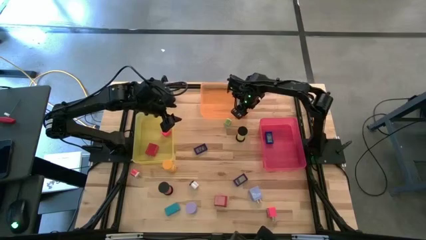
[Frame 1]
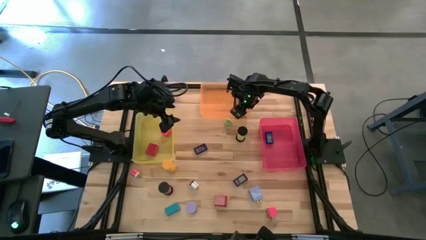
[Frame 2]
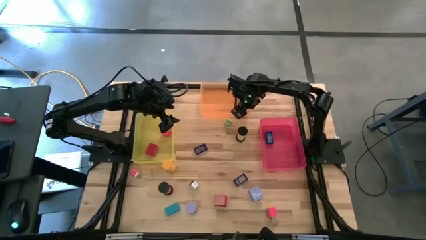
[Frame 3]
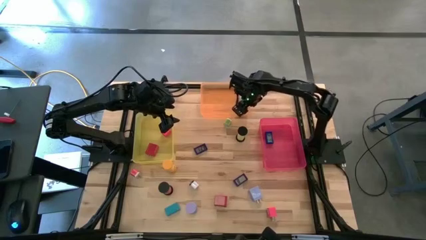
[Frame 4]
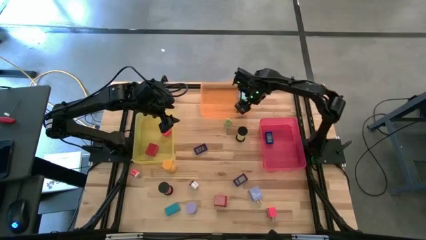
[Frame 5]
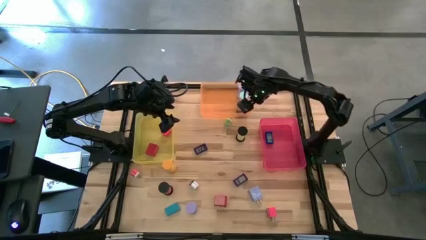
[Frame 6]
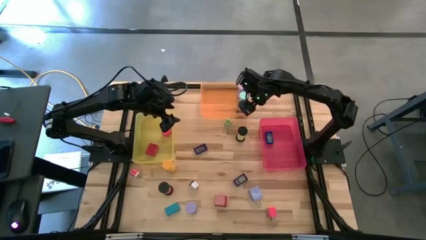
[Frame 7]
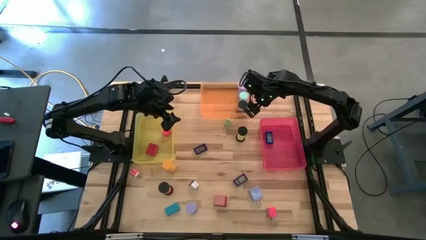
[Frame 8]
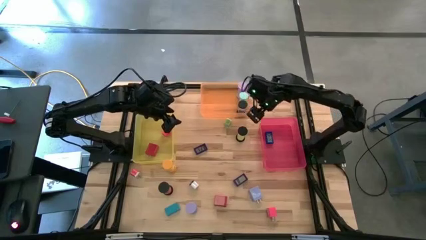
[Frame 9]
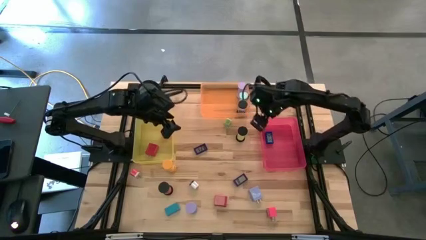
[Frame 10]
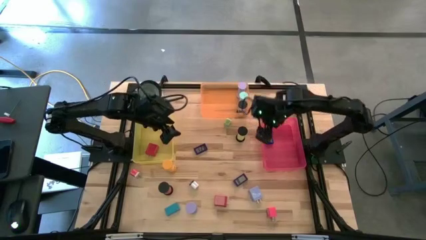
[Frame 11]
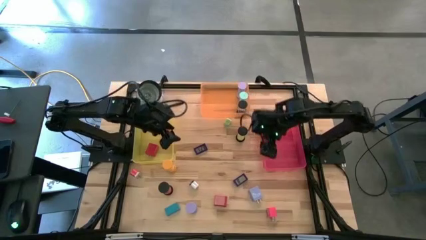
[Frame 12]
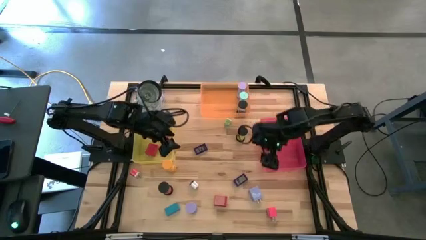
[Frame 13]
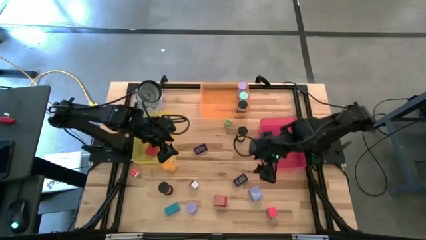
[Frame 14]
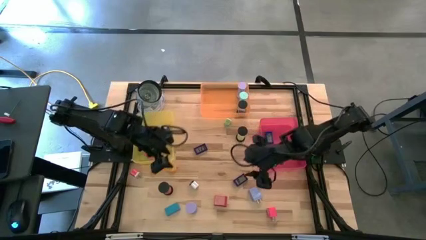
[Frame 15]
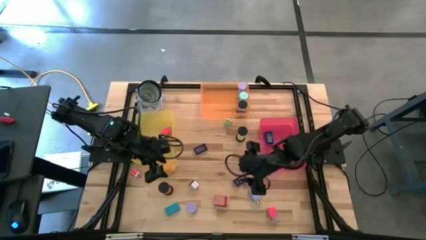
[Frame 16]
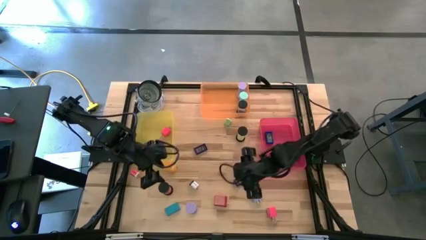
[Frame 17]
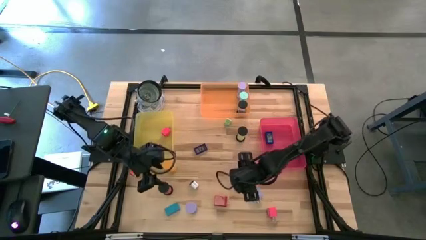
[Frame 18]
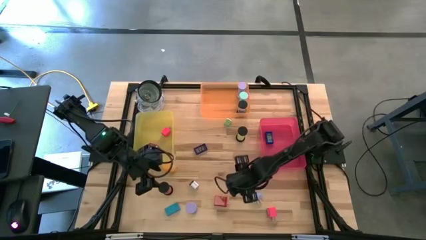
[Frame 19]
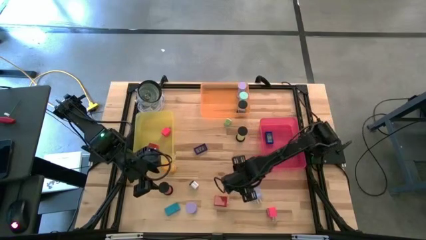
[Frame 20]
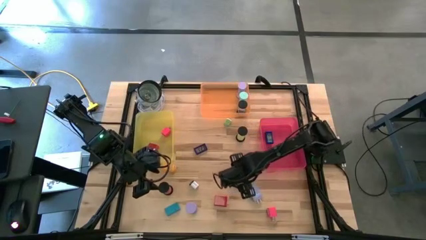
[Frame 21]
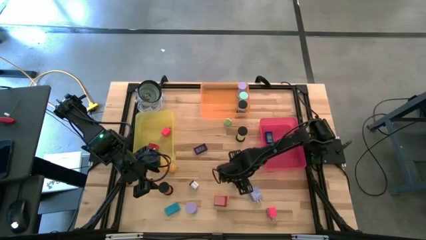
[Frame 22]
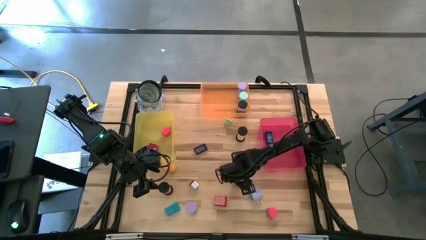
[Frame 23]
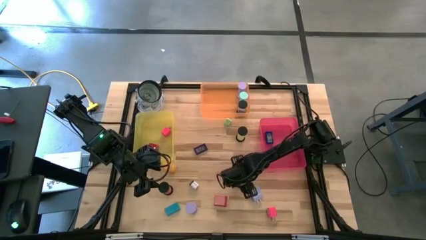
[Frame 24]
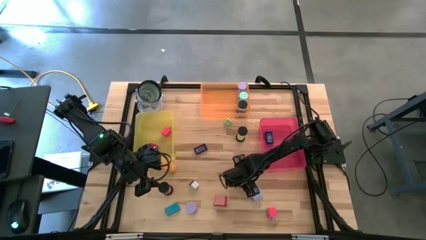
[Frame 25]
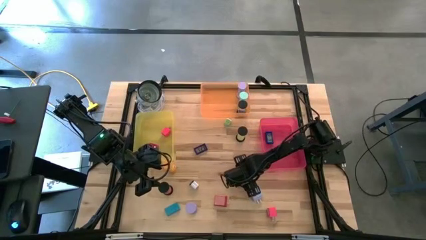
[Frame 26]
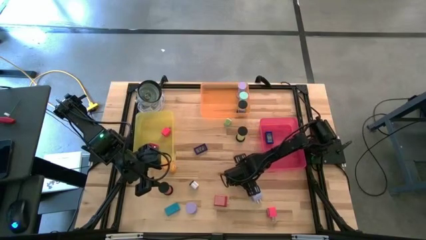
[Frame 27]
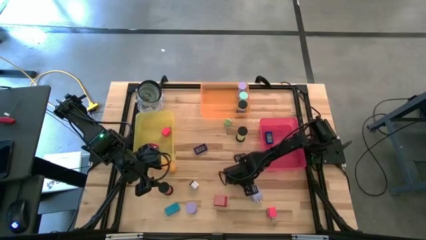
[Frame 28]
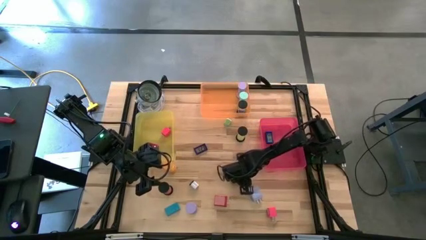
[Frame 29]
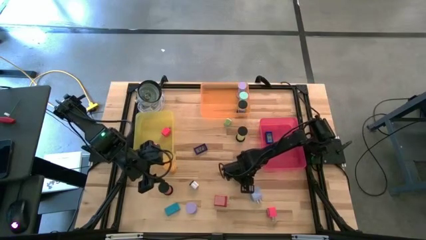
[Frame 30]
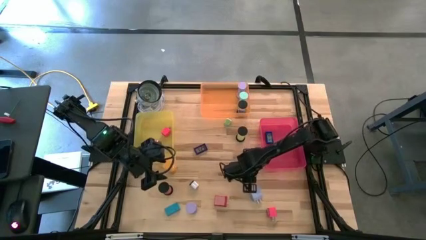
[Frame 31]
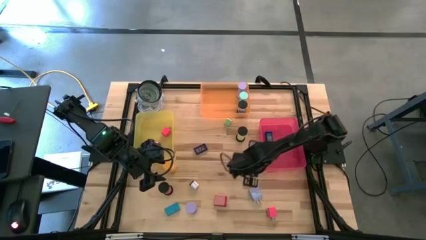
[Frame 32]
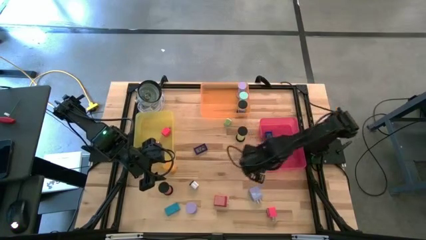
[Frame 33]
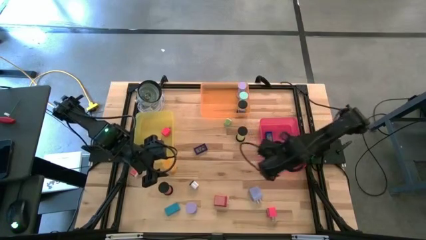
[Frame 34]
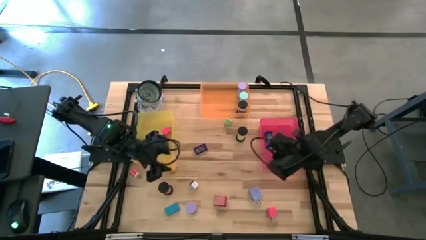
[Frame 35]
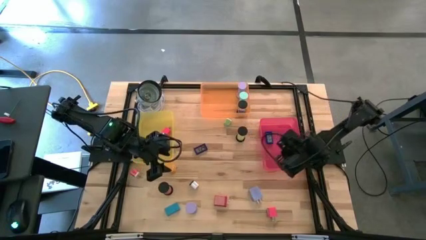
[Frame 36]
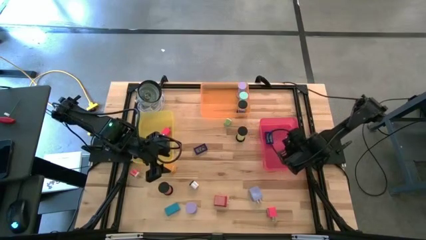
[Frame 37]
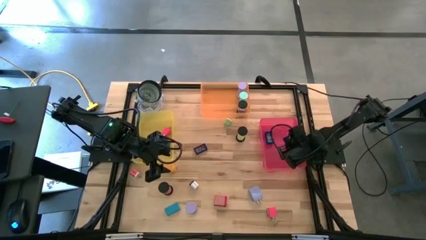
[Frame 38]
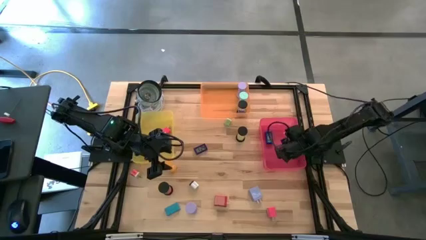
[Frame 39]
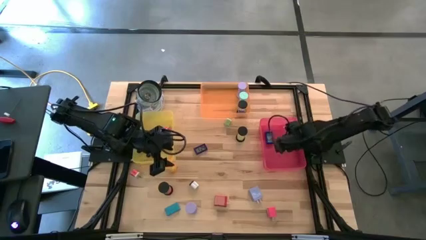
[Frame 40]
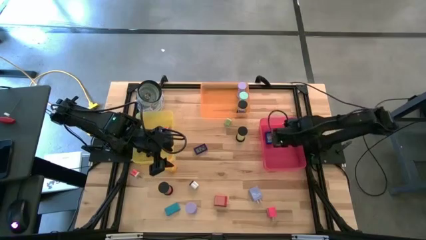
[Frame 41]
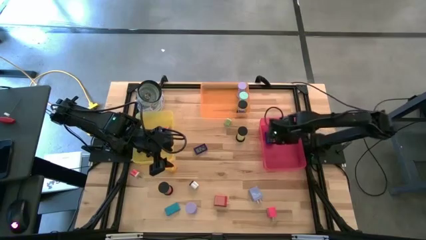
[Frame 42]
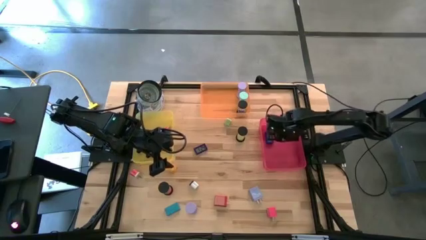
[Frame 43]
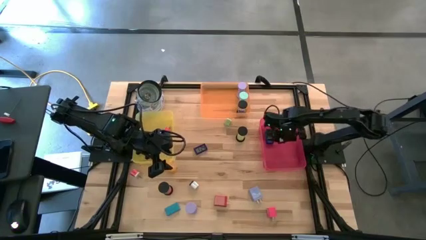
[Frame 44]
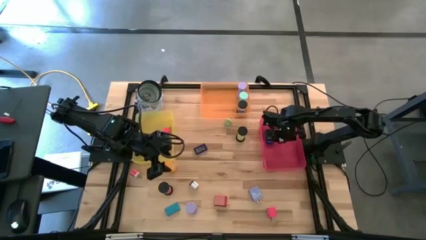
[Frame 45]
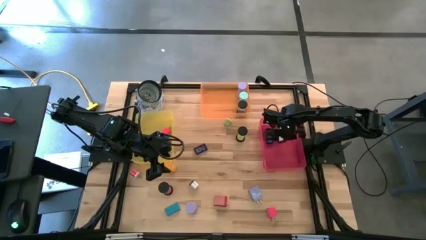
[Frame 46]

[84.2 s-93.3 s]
Task: Pick & Place Office items
Put the blue clock in the red bin

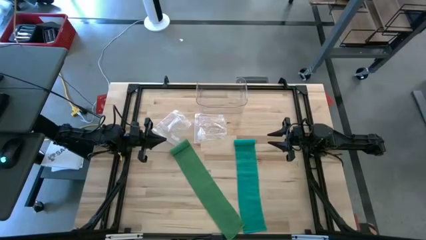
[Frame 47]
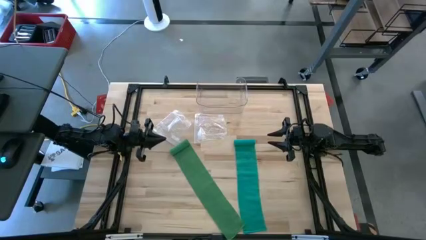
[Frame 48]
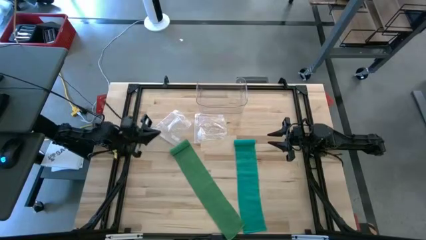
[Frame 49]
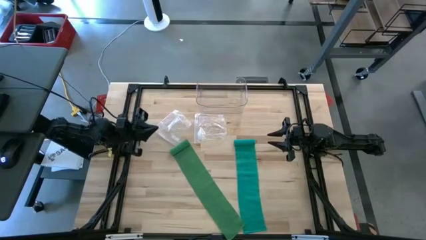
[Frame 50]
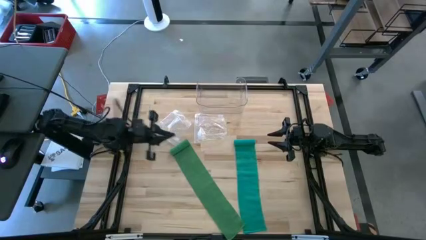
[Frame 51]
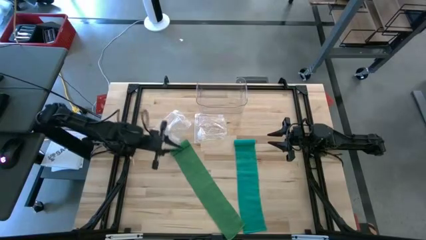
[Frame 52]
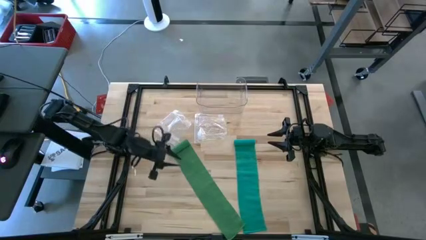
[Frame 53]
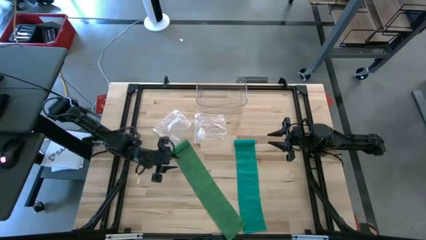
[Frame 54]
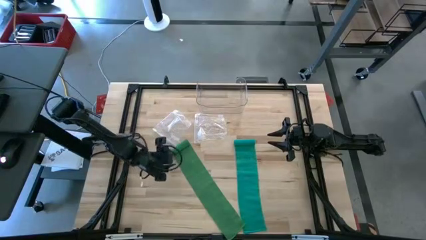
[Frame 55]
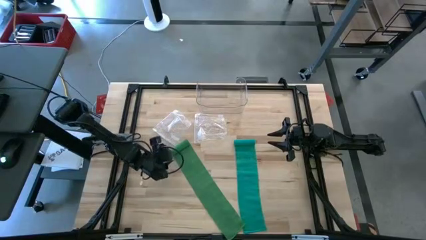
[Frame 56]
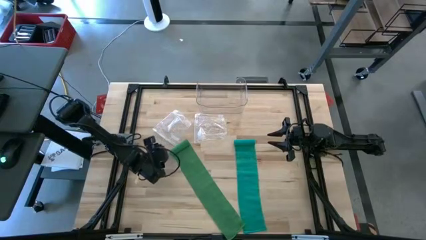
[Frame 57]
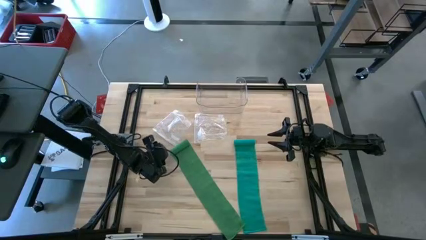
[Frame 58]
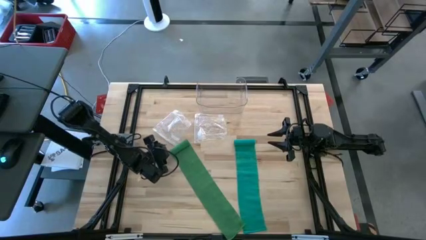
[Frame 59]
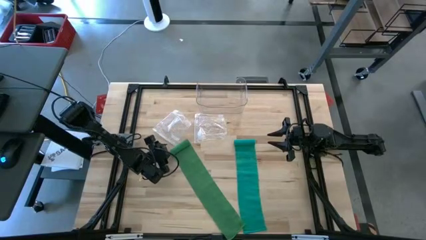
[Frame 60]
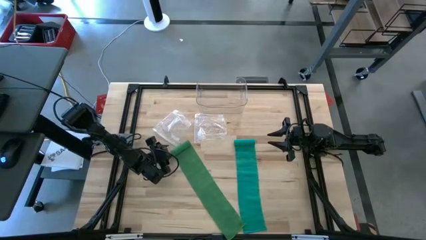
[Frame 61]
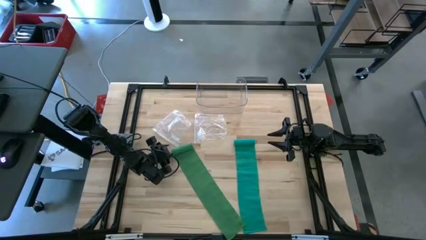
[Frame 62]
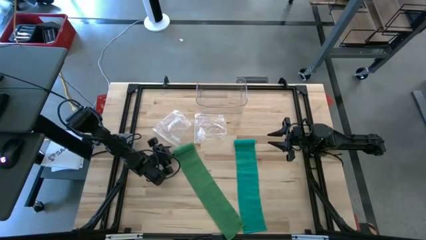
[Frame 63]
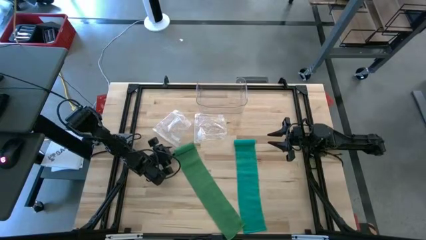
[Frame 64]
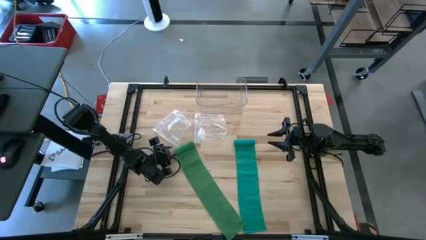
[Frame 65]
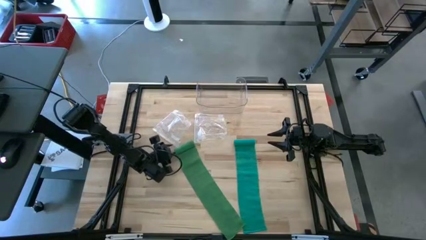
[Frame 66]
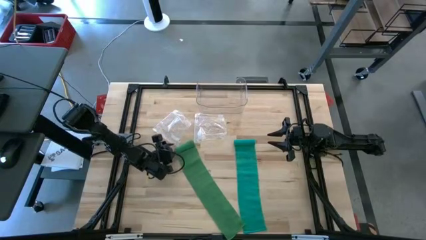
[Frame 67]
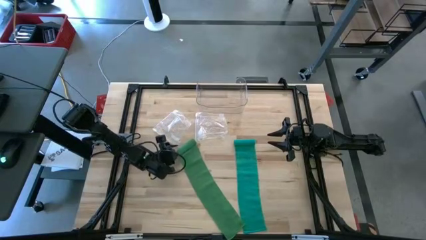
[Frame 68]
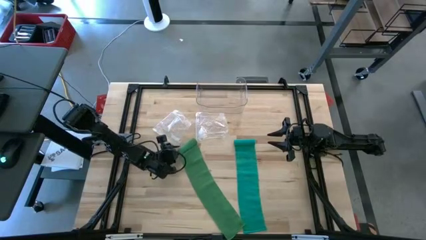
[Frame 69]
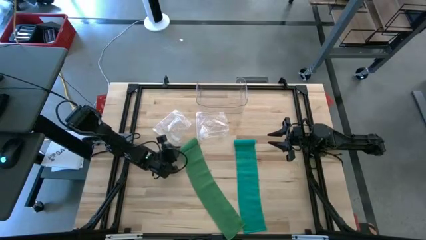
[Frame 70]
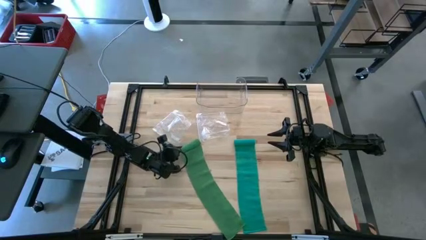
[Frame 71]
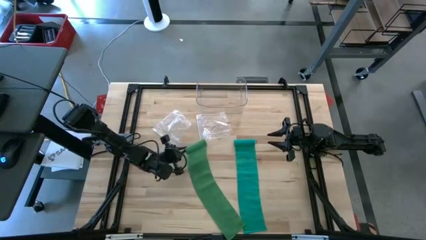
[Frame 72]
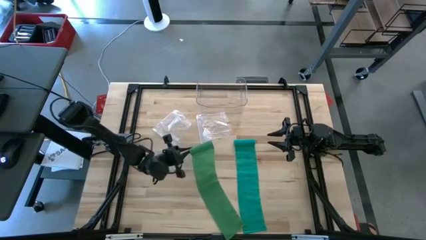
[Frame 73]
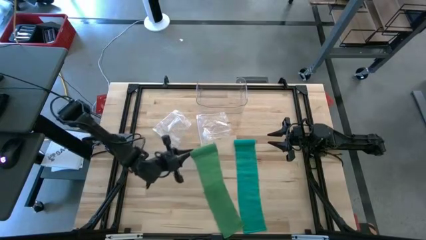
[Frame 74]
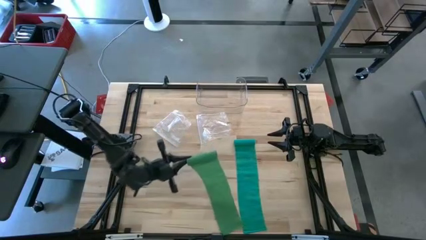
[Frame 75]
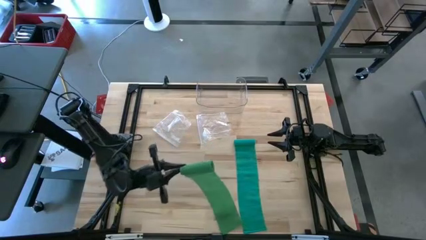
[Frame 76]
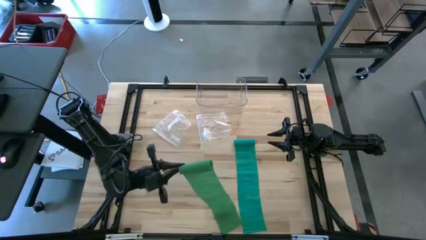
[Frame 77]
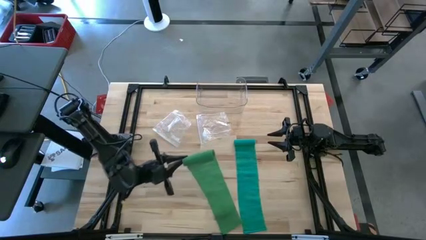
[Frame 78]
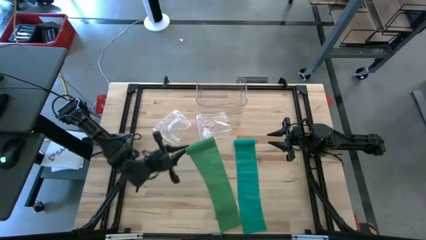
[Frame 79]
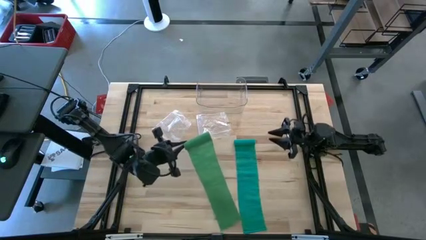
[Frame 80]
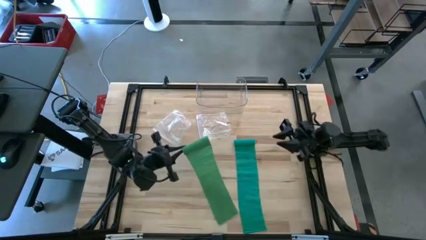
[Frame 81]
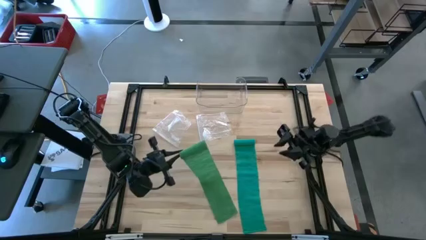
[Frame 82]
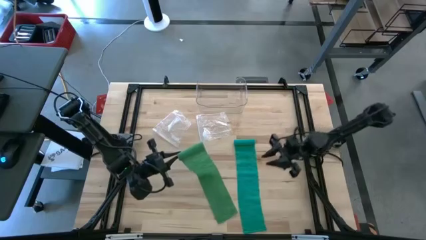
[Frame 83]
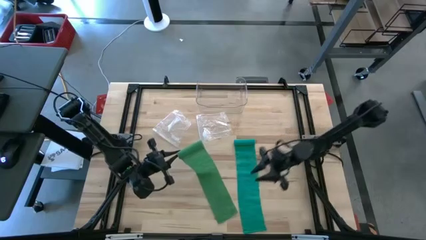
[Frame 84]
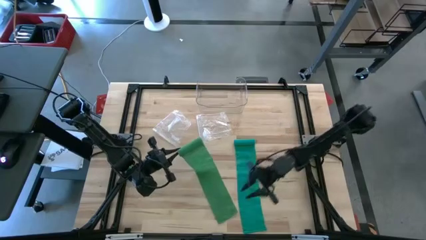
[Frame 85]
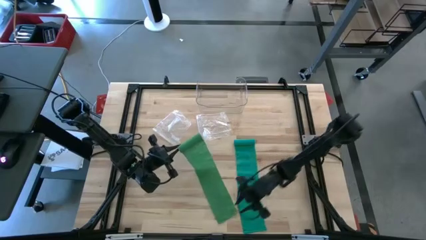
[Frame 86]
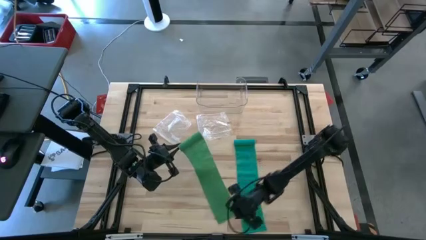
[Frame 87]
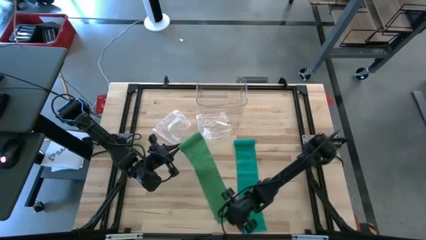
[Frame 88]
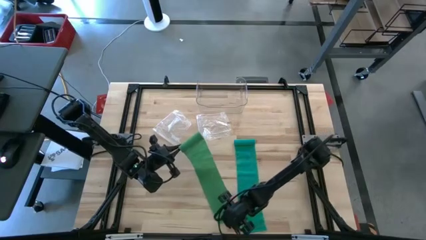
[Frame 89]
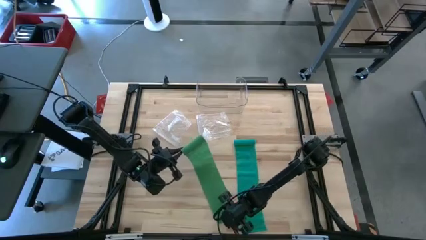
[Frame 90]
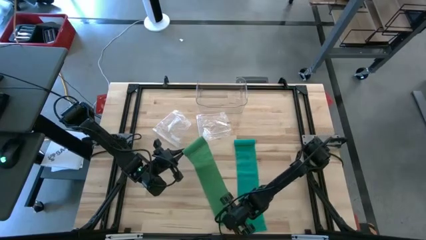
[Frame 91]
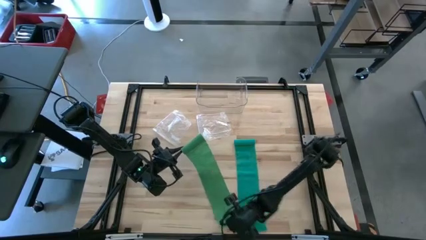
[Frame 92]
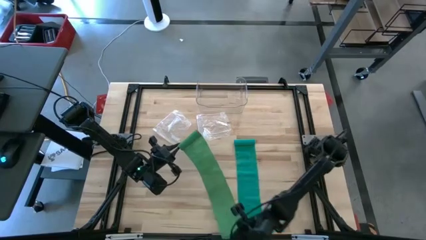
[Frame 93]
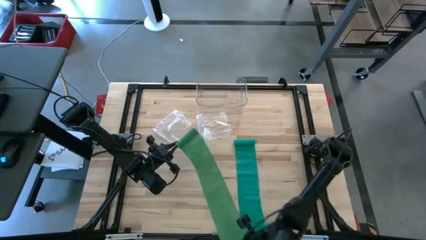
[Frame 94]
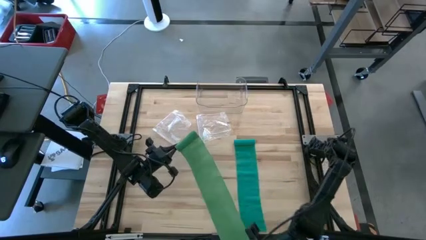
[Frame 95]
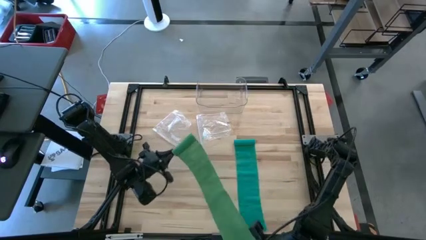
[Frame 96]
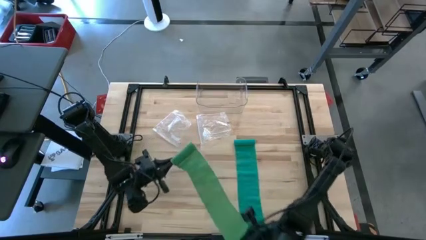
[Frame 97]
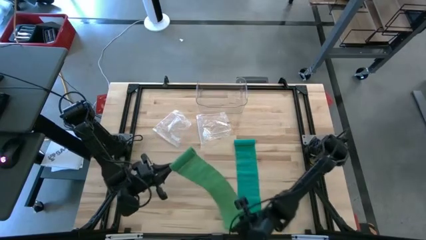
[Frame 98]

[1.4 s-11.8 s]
Task: Roll bandage
Roll the green bandage on the table
